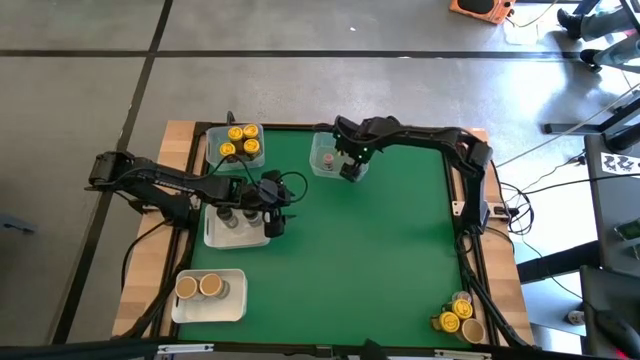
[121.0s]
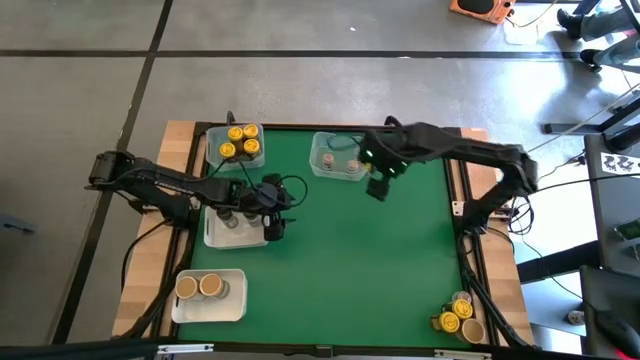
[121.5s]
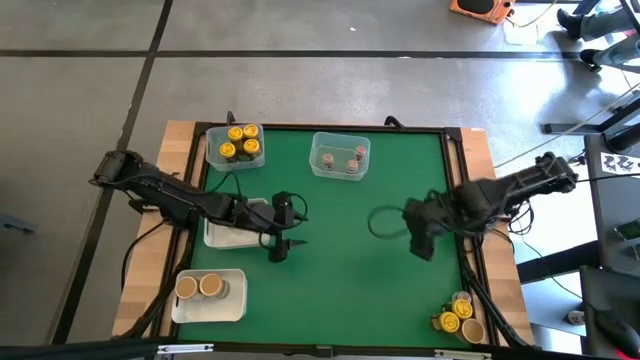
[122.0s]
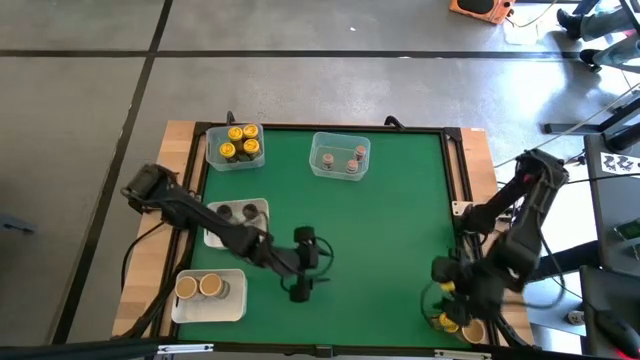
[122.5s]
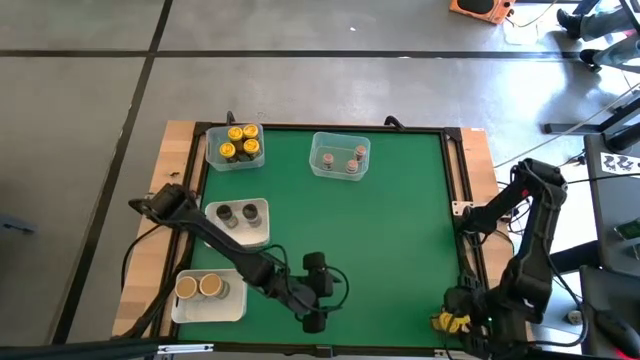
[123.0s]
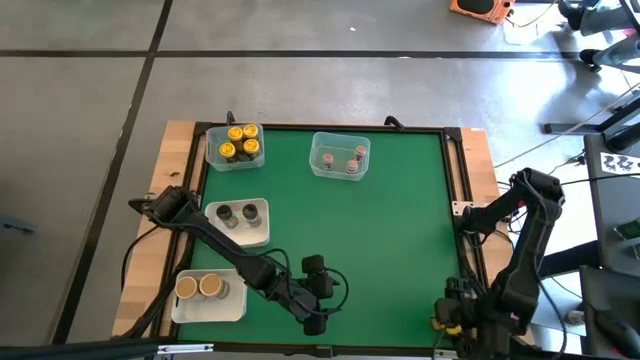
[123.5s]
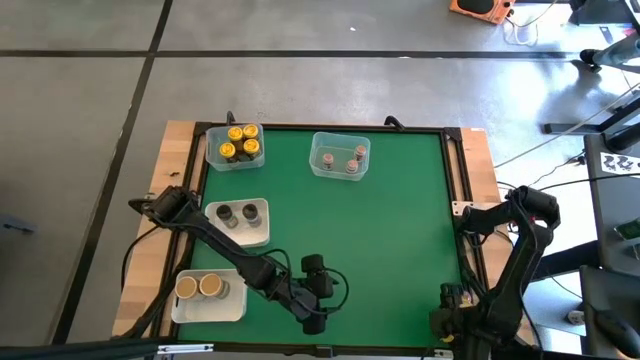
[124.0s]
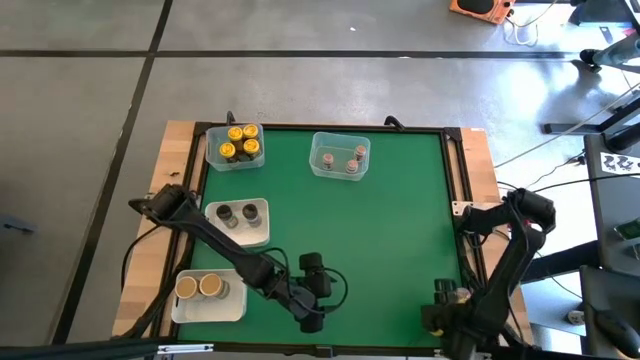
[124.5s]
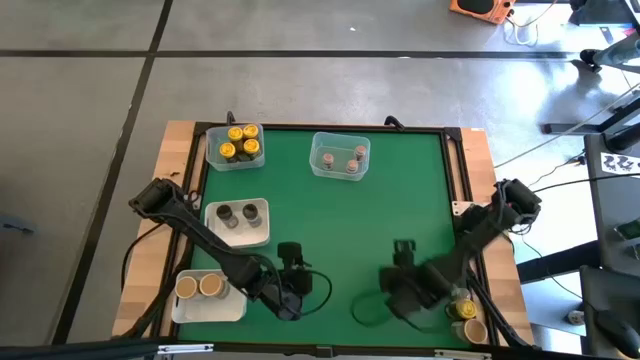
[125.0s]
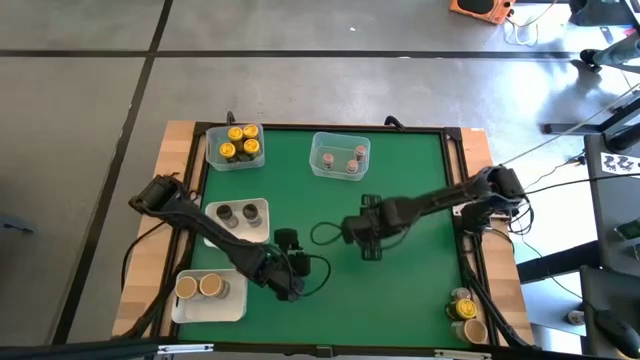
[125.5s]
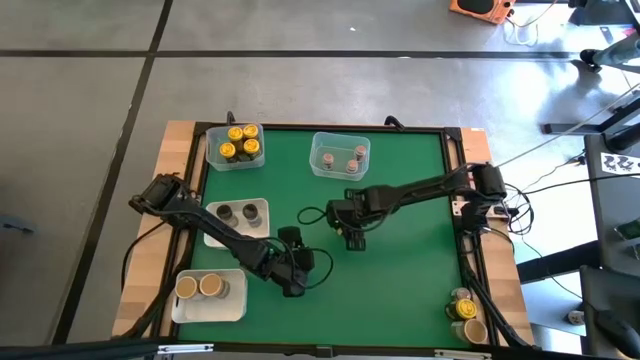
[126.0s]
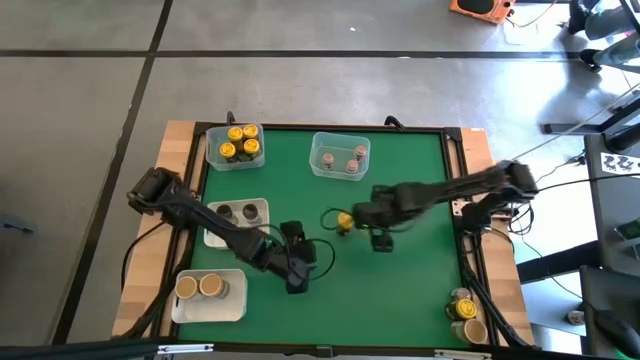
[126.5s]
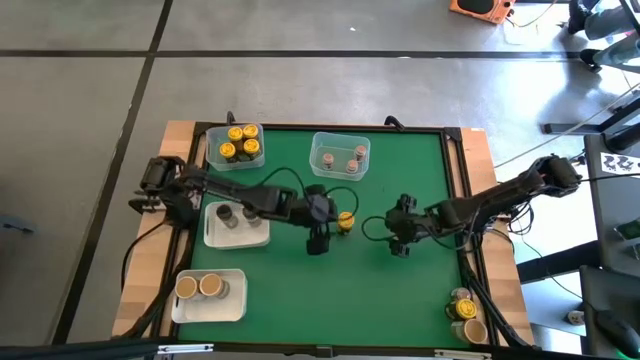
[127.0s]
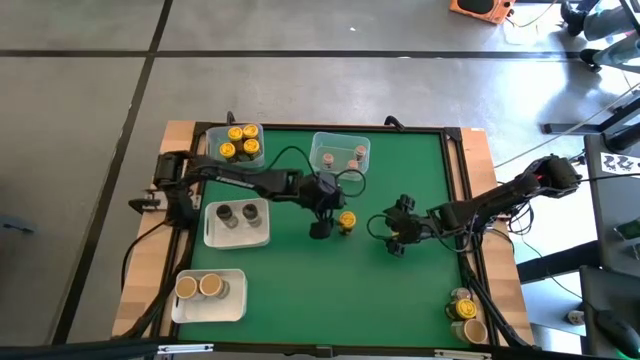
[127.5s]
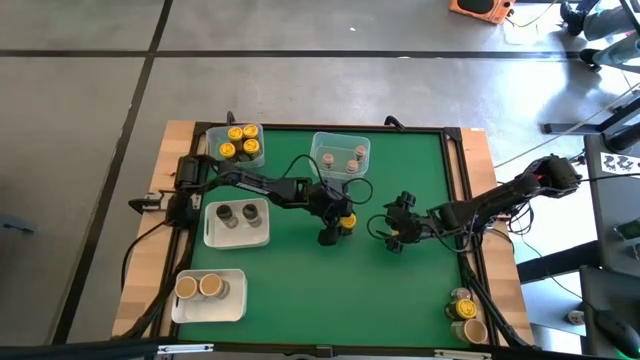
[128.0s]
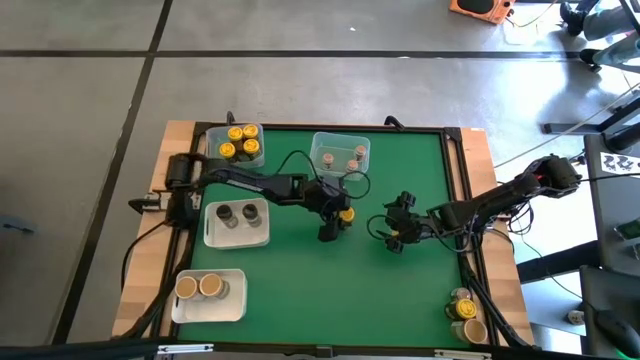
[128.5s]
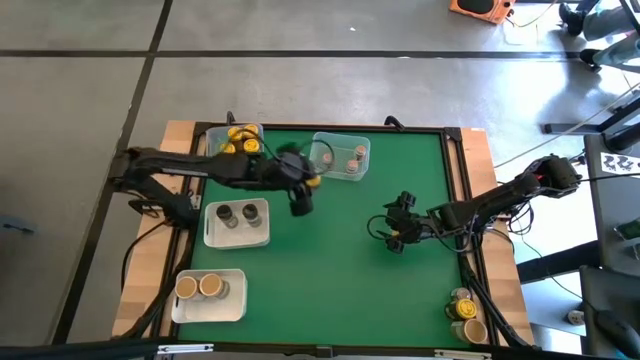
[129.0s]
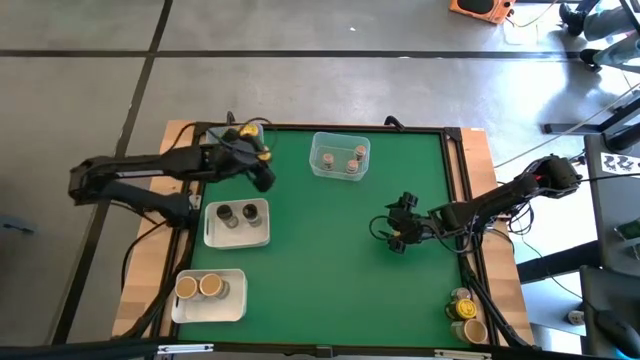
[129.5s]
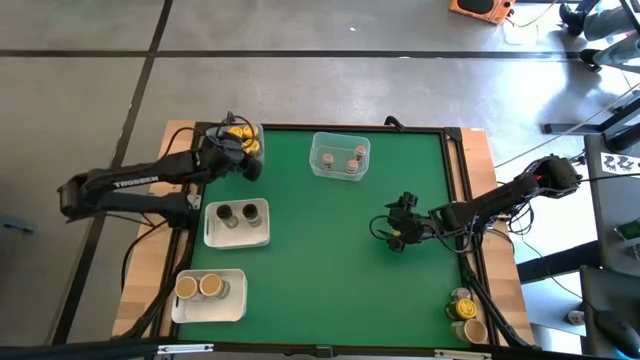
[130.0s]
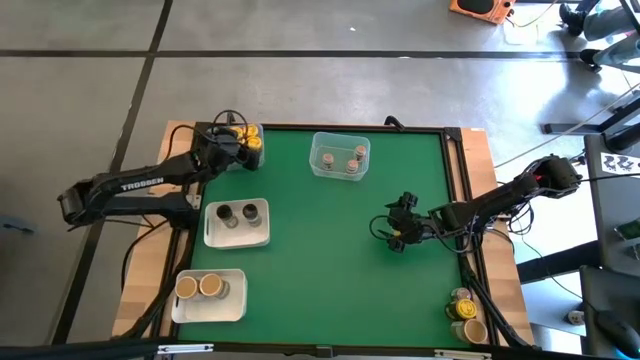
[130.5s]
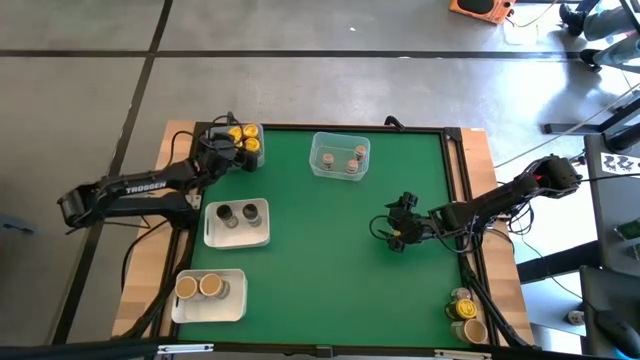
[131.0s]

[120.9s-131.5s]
Task: Sort spices by type
Put the yellow seasoning bottle into the left transparent bin

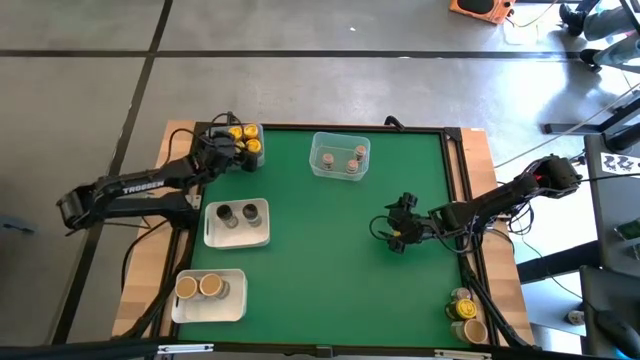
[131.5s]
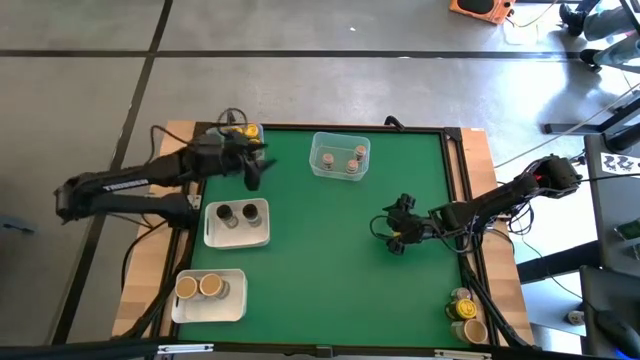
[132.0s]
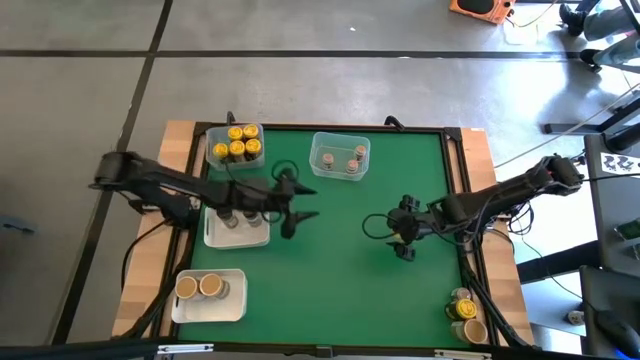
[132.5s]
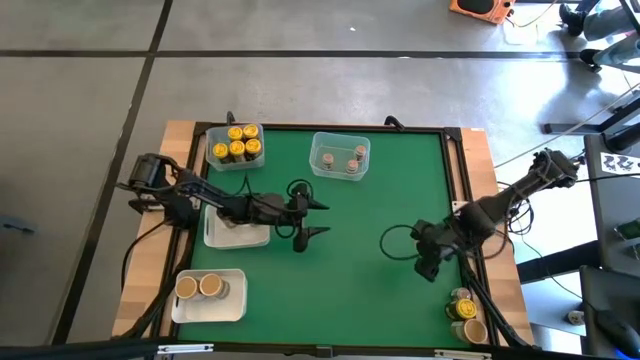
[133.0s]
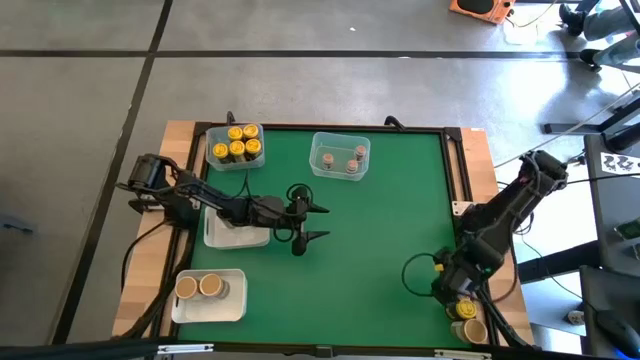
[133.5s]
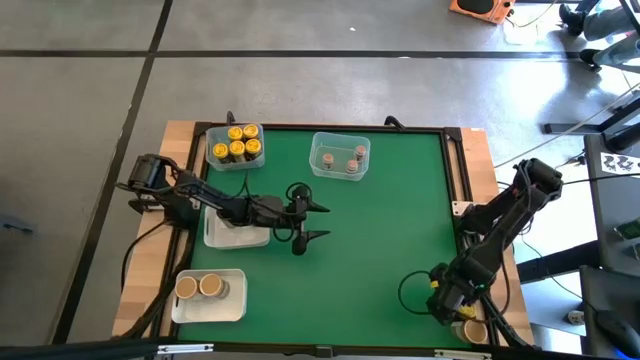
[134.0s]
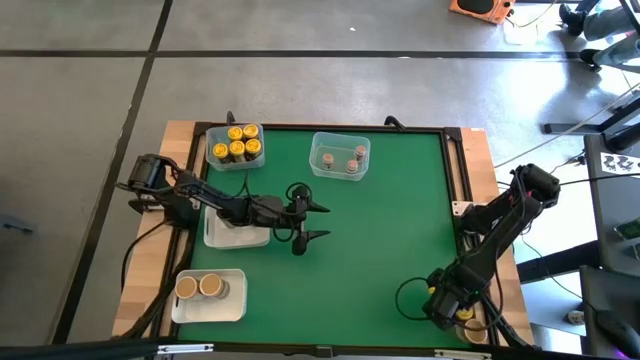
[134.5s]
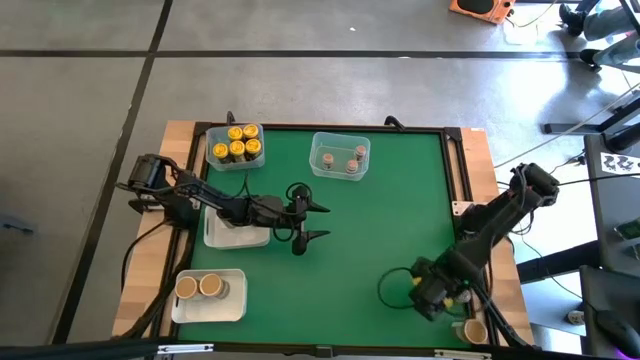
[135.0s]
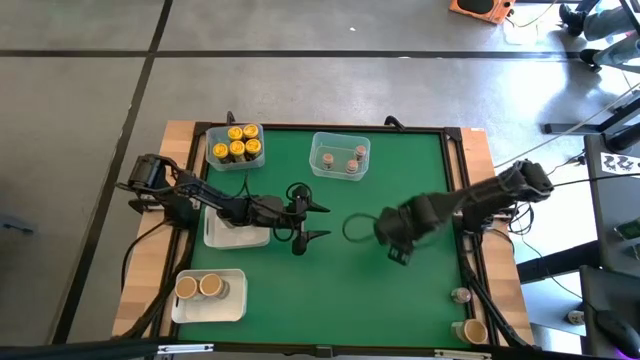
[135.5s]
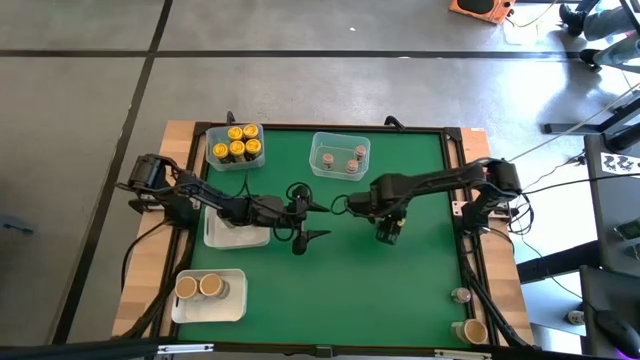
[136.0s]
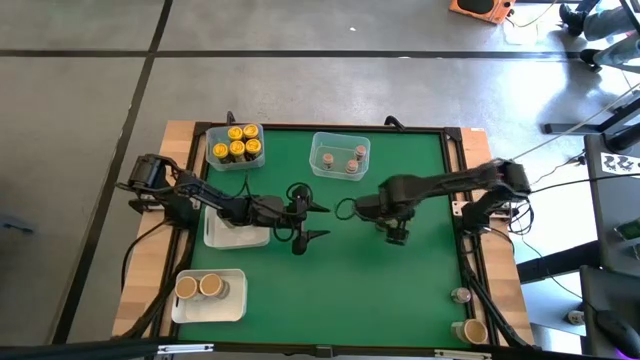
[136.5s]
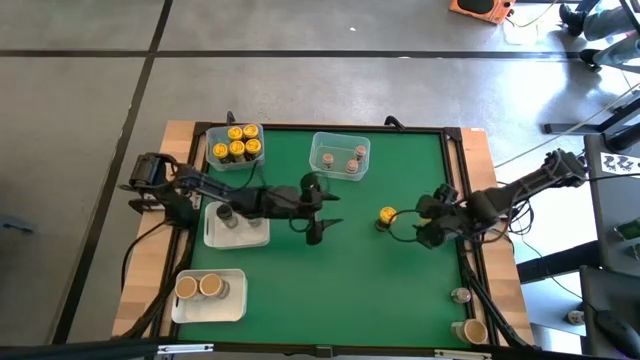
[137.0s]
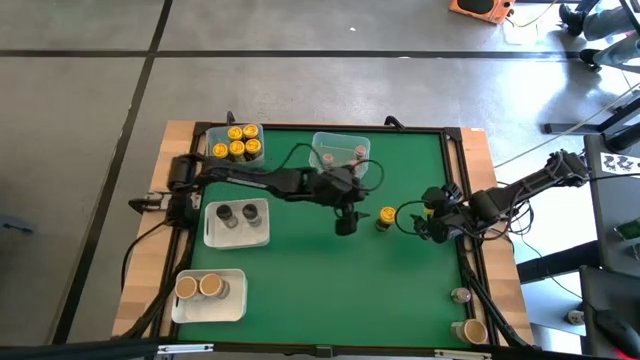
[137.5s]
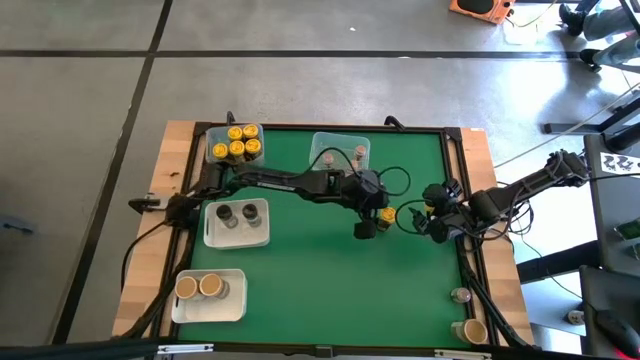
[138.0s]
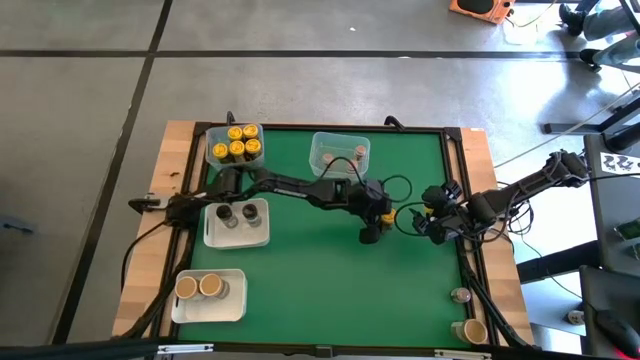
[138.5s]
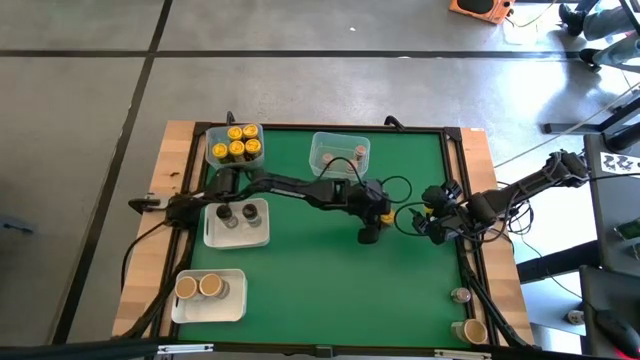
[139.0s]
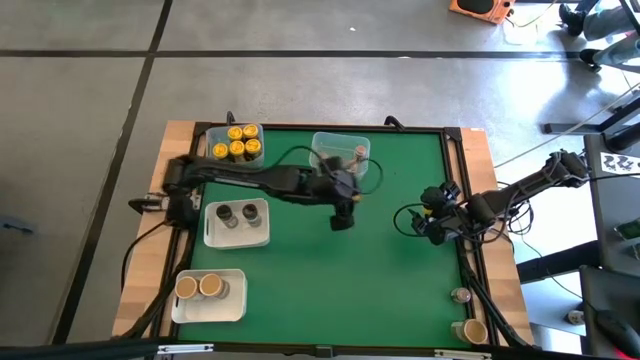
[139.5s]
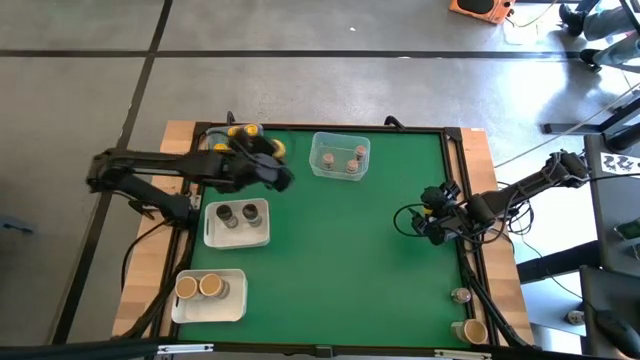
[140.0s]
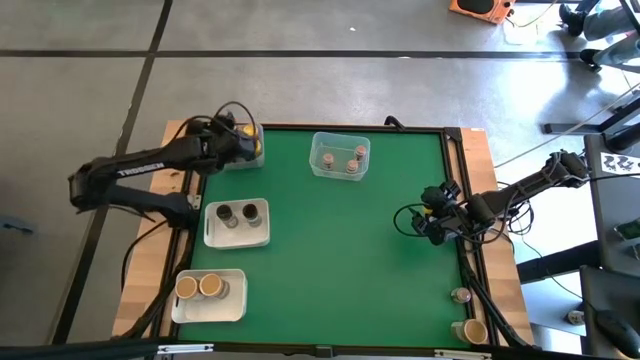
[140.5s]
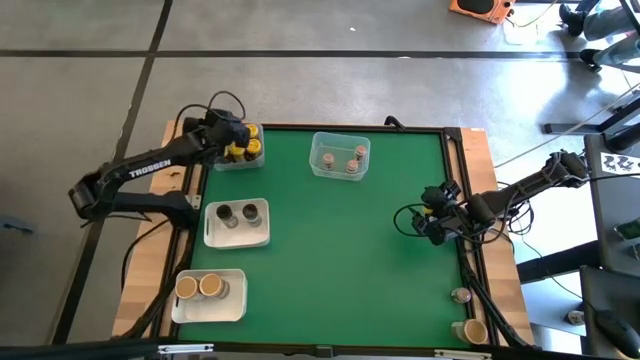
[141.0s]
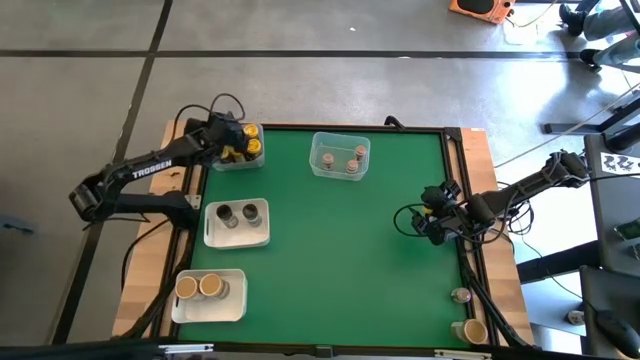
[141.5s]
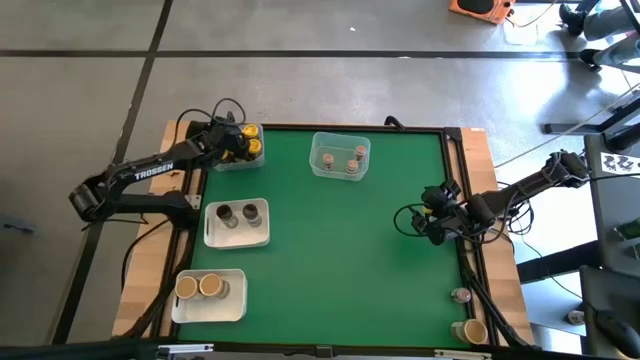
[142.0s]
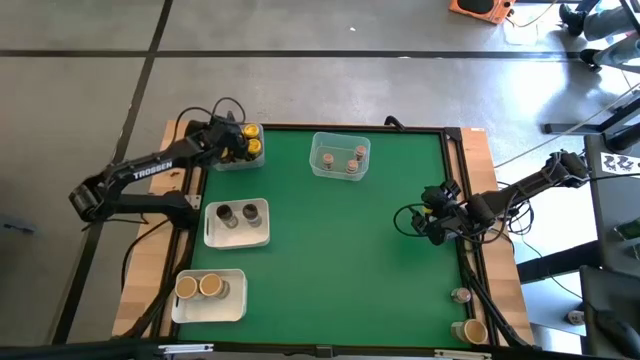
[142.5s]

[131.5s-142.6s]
Put the yellow seasoning bottle into the left transparent bin
